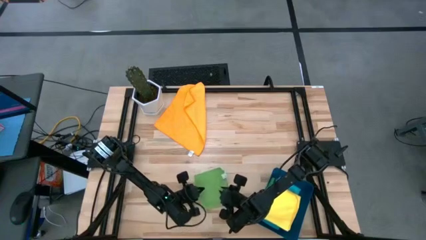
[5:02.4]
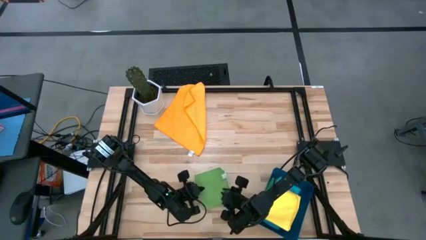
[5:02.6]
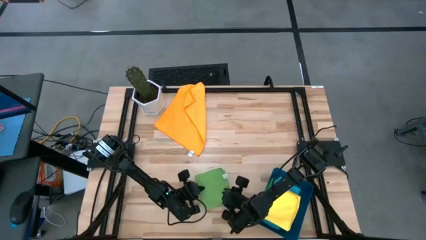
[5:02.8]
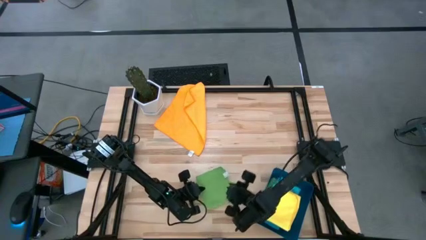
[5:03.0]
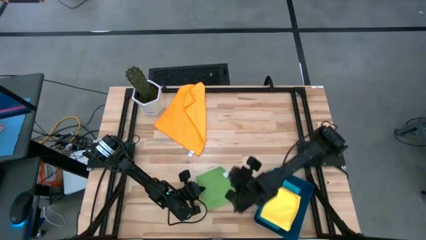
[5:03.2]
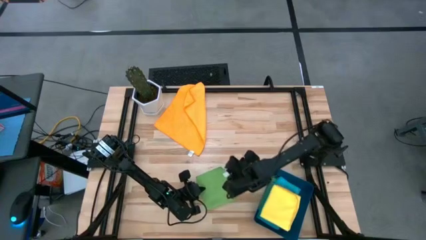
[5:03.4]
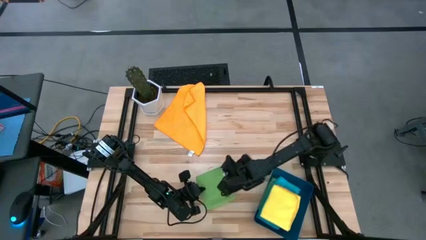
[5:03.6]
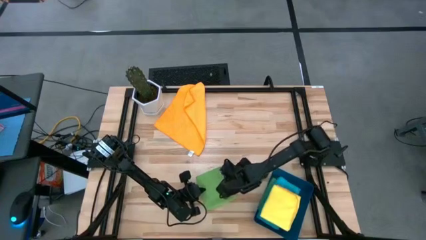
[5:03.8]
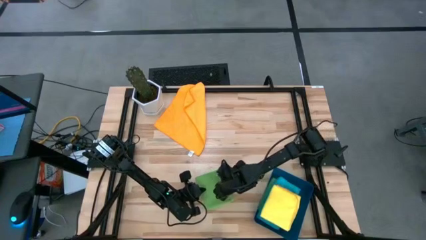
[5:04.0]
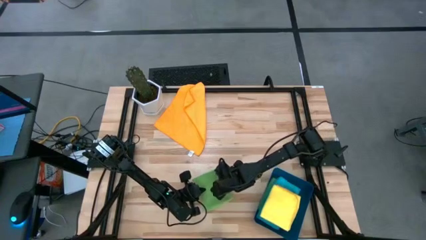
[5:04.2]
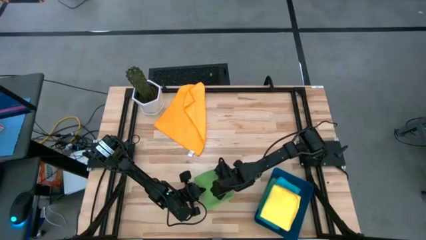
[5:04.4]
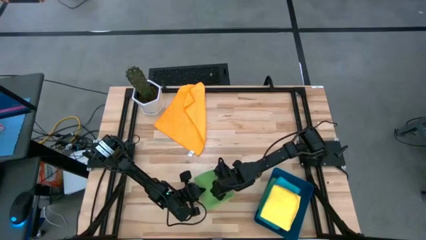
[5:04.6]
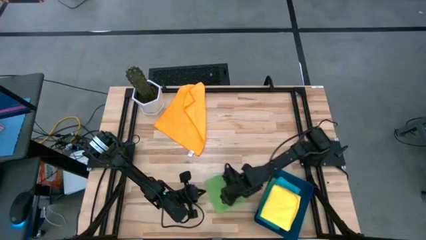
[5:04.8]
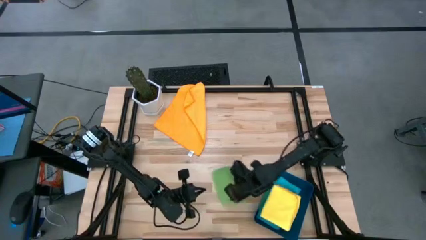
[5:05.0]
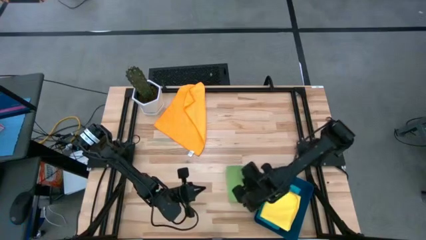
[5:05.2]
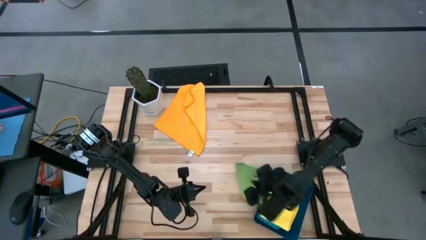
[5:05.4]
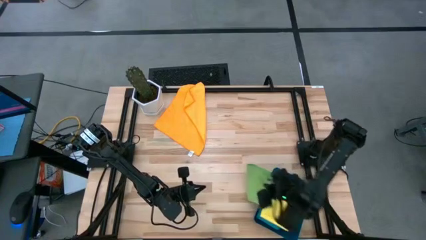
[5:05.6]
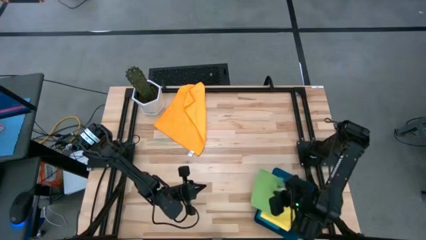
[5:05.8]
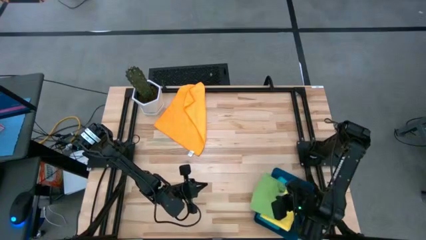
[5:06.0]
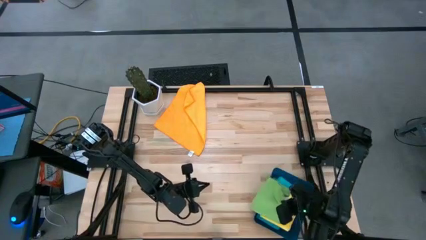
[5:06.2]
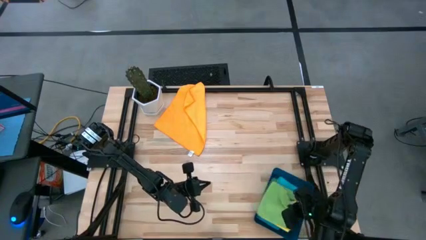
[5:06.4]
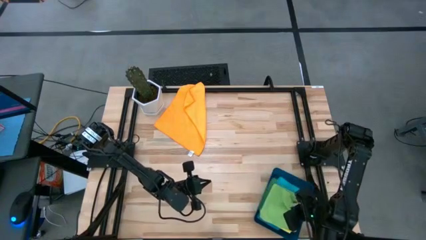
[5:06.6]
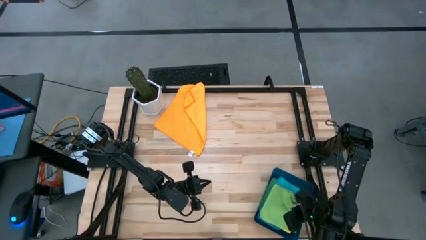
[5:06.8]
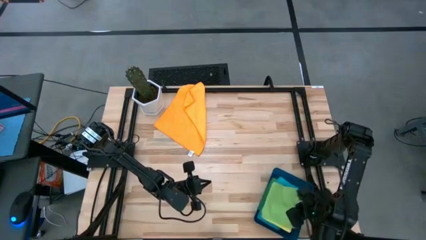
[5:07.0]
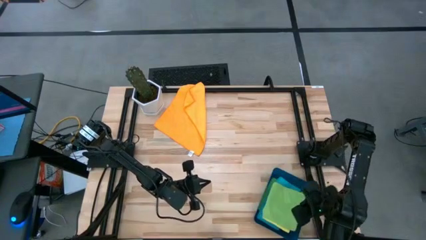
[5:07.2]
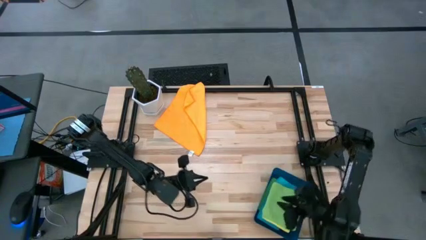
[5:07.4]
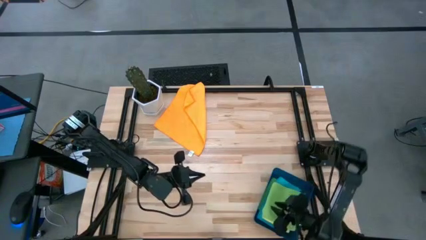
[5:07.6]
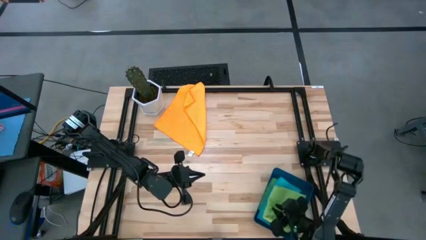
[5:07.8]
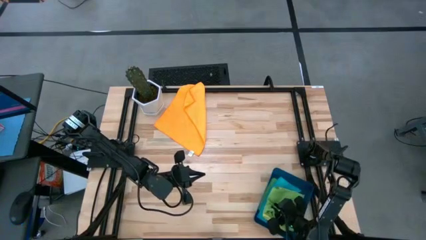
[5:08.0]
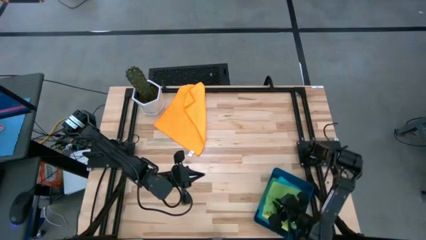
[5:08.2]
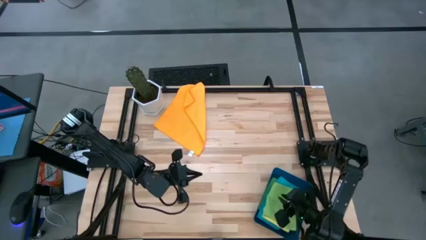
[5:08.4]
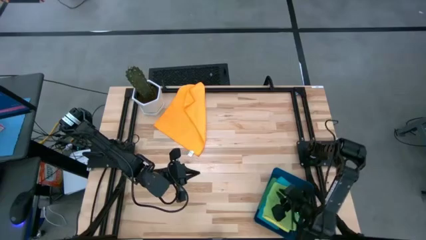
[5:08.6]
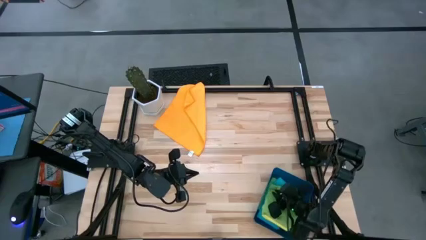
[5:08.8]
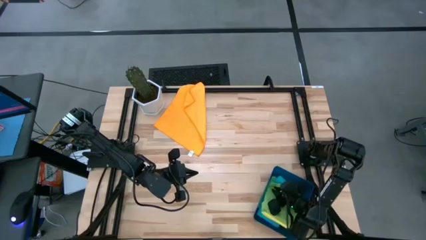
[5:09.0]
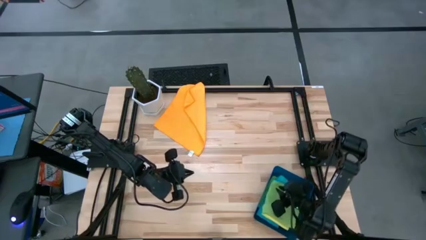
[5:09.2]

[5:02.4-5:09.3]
Task: Fold microfiber towels
Put the folded green microfiber towel into the blue bin

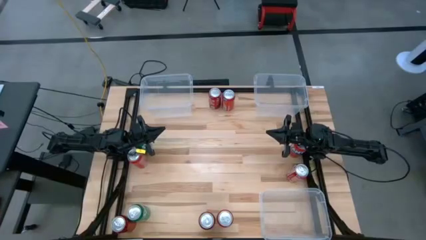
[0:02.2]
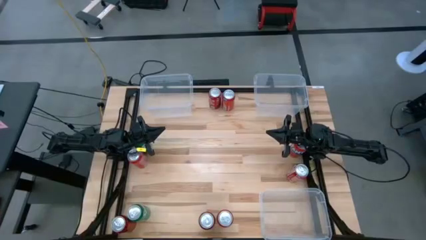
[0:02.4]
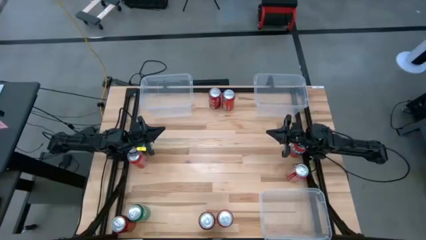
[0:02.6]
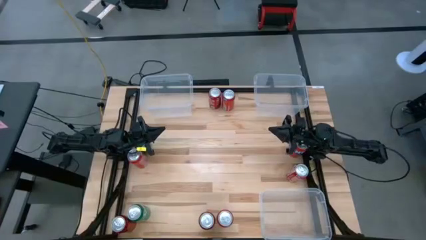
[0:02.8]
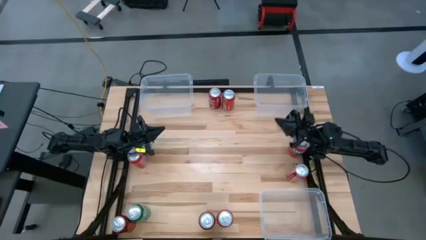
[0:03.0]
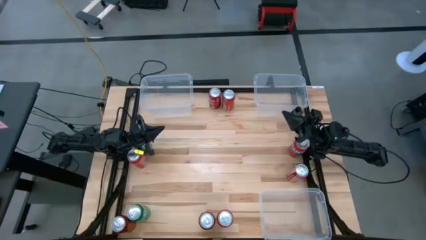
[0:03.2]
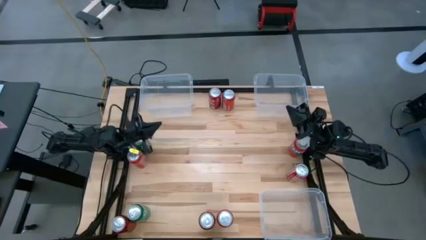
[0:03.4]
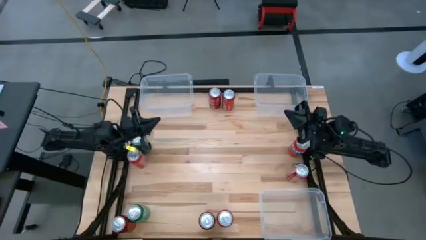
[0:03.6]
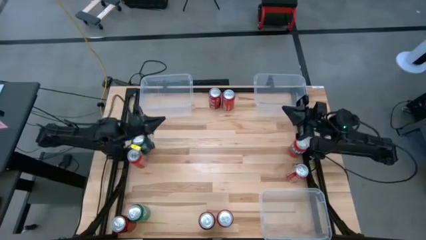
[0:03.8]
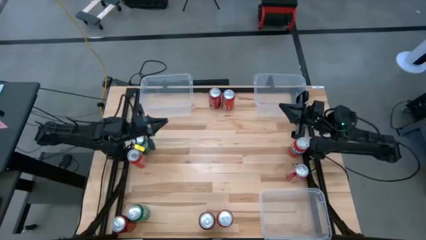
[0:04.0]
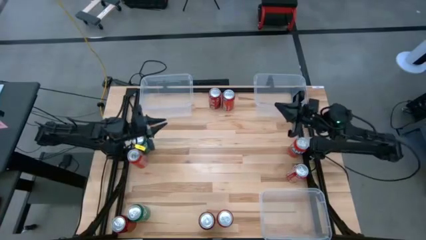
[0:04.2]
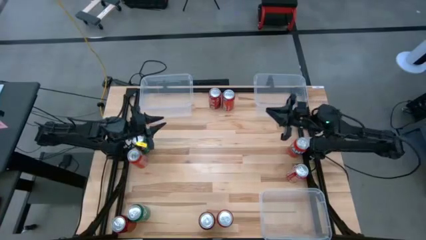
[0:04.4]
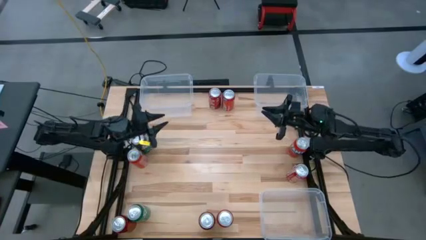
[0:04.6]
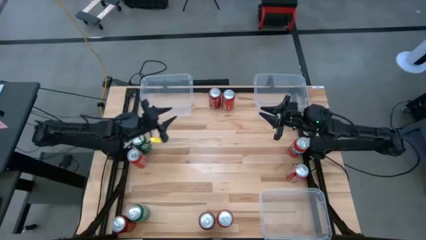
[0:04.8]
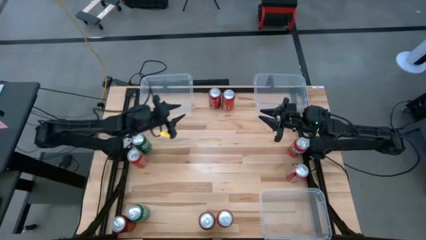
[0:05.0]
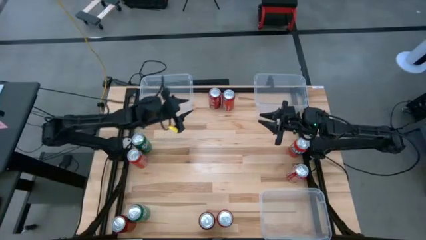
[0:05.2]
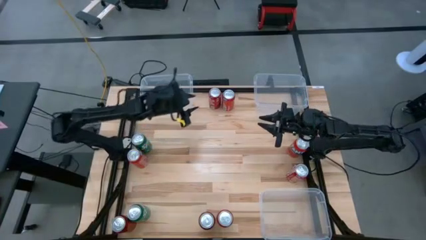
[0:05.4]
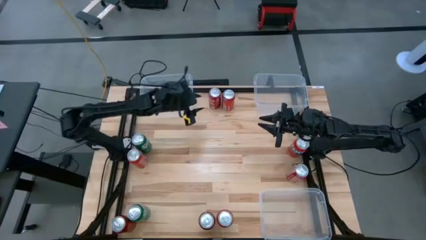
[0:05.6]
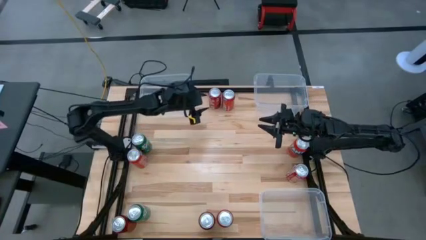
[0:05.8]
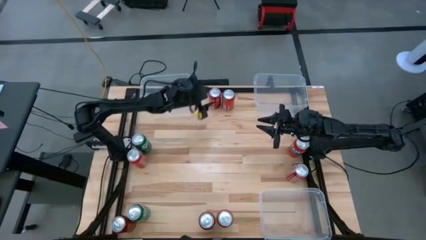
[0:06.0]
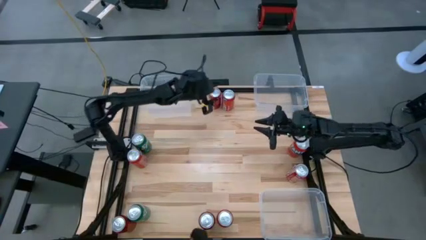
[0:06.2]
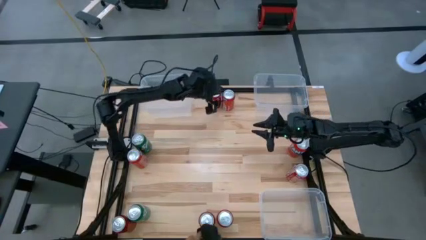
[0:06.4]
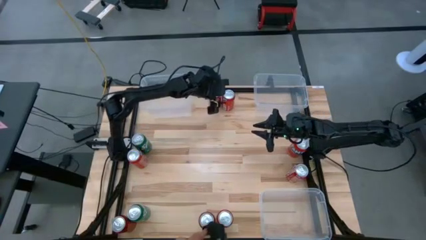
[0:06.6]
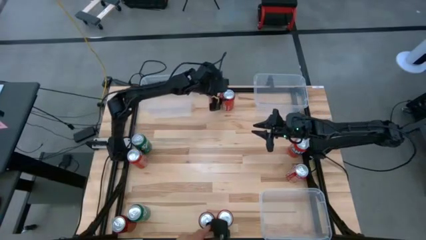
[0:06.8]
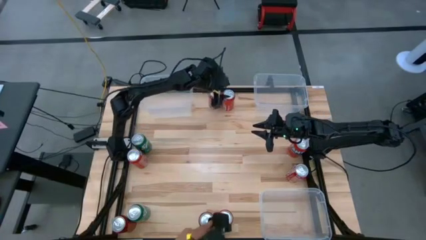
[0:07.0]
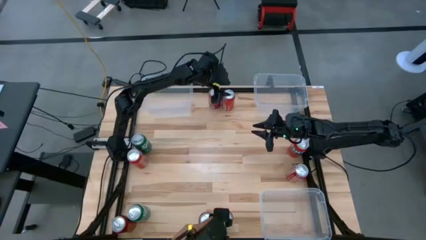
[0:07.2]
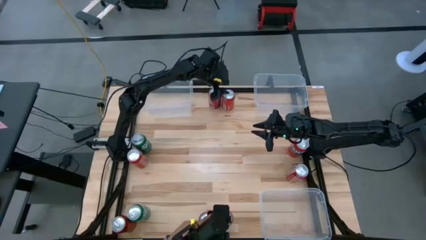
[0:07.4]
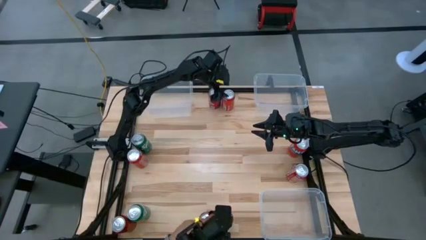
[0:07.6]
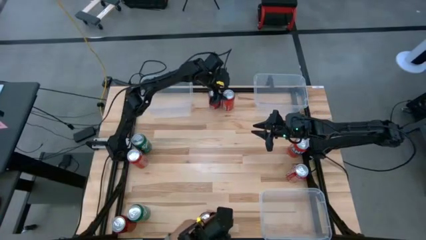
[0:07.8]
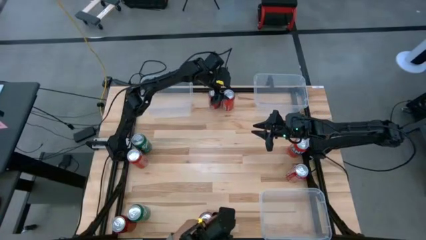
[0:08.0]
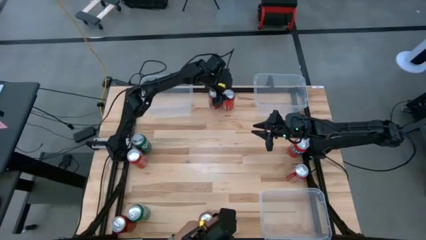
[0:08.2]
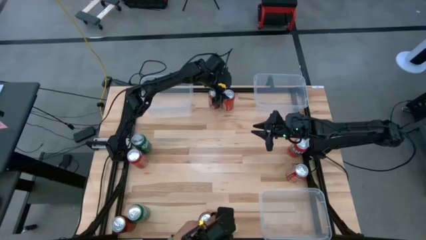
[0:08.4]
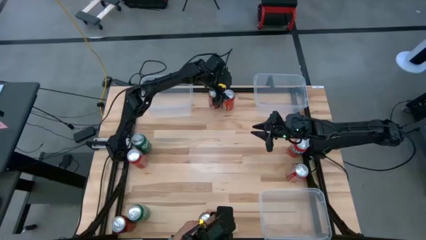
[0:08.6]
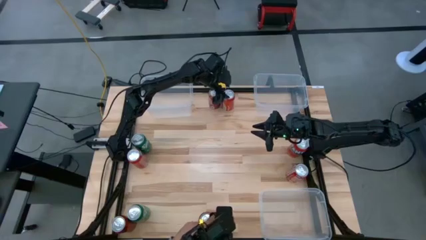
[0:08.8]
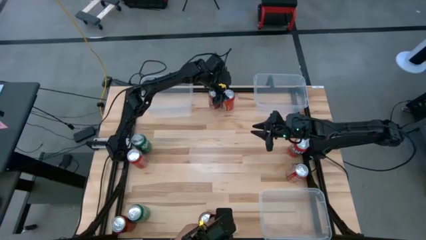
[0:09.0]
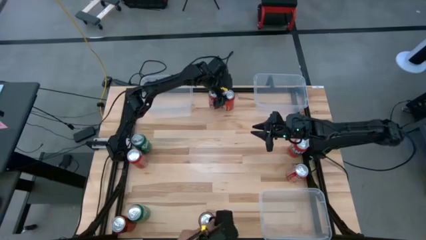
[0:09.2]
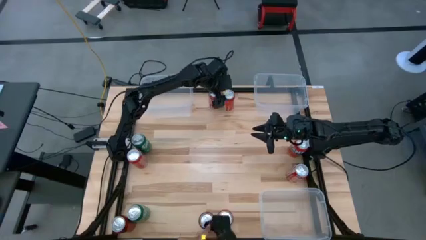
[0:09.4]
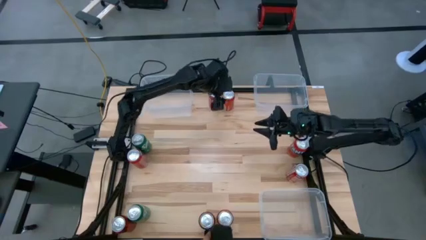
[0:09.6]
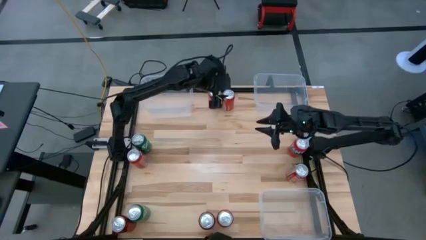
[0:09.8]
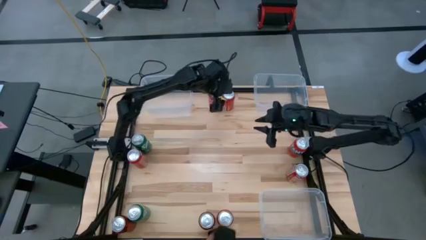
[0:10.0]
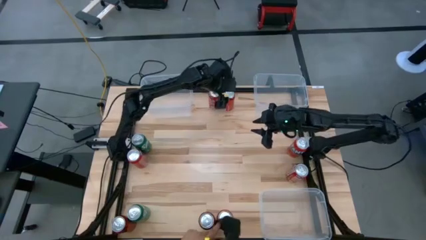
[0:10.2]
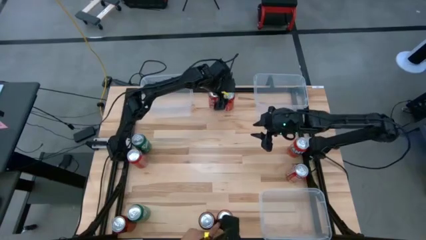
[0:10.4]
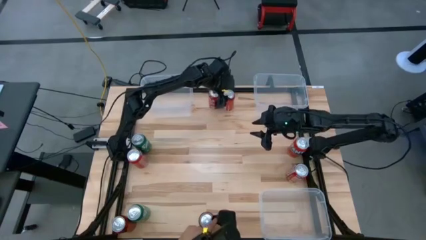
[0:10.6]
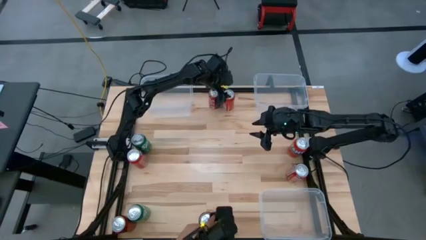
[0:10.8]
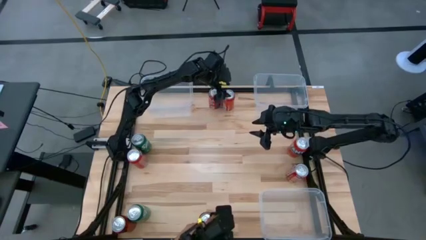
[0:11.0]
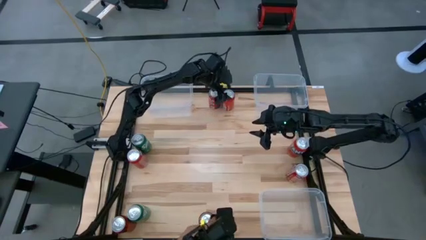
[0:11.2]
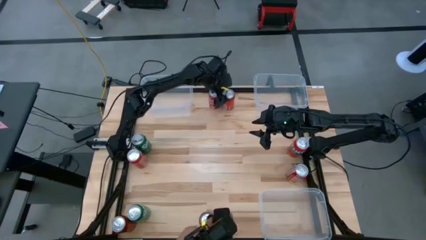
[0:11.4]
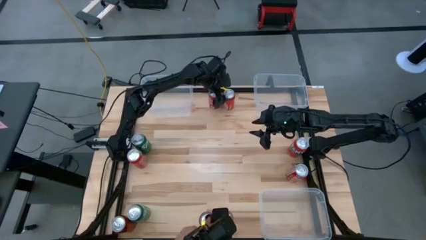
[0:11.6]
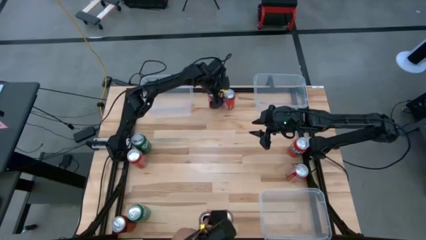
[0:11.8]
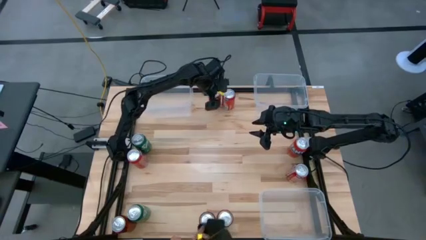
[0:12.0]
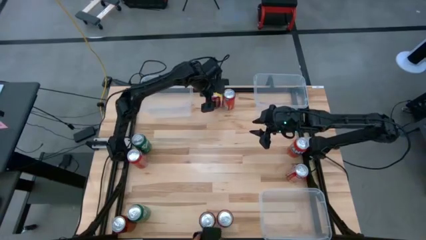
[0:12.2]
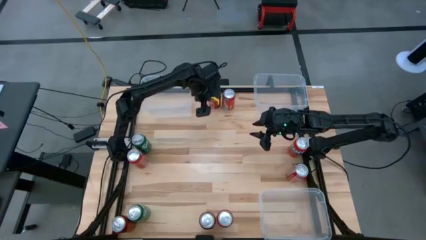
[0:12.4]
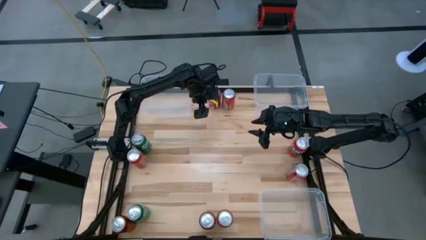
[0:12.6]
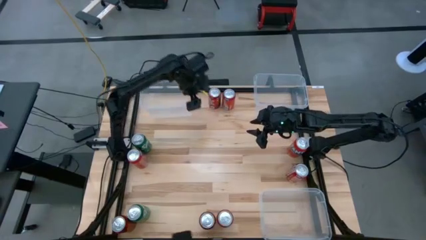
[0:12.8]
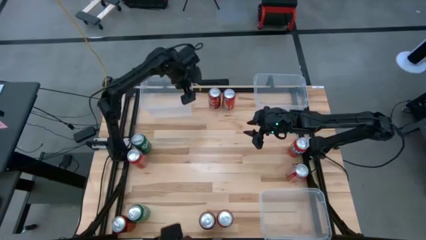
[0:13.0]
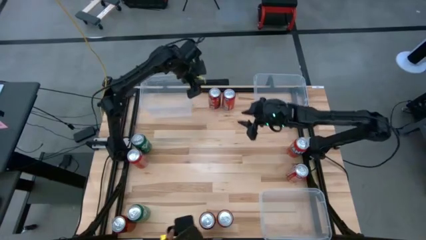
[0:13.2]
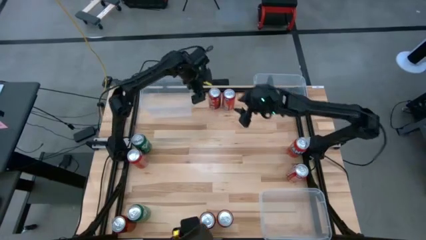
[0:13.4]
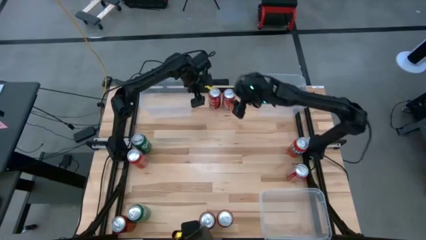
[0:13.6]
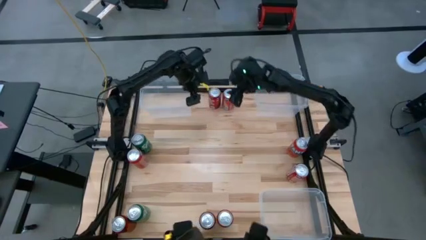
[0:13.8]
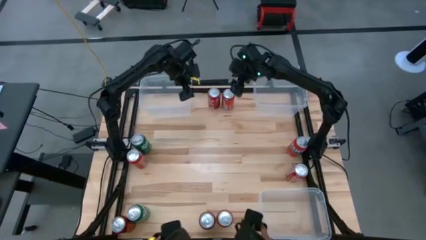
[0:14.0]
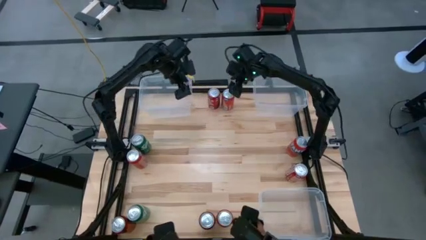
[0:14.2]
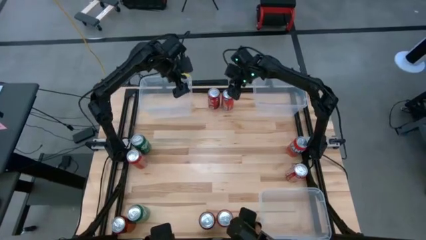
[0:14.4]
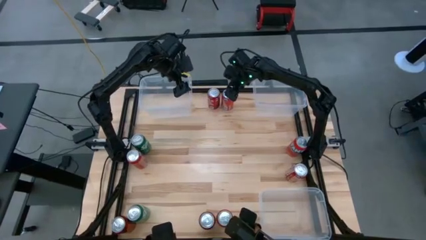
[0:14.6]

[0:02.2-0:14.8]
Task: Sort soda cans
Put the middle right red soda can into the top right transparent bin
